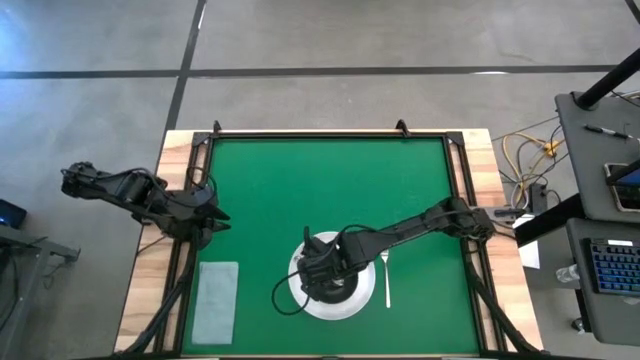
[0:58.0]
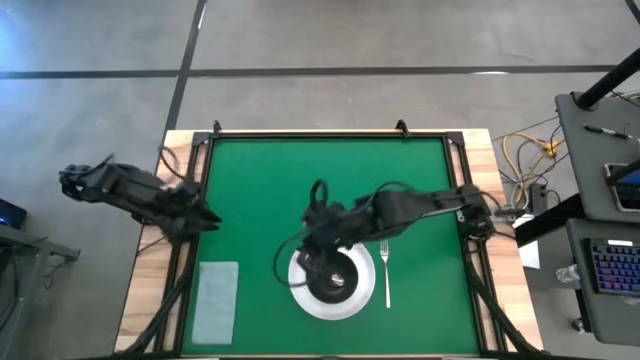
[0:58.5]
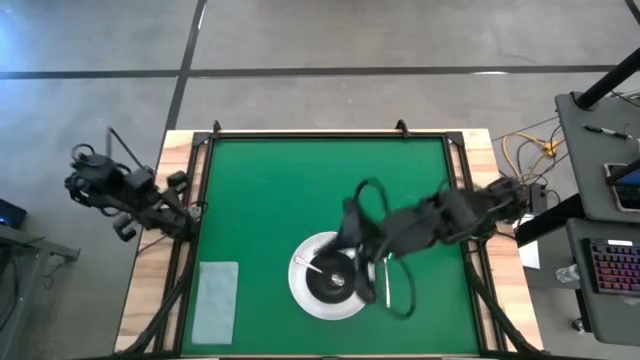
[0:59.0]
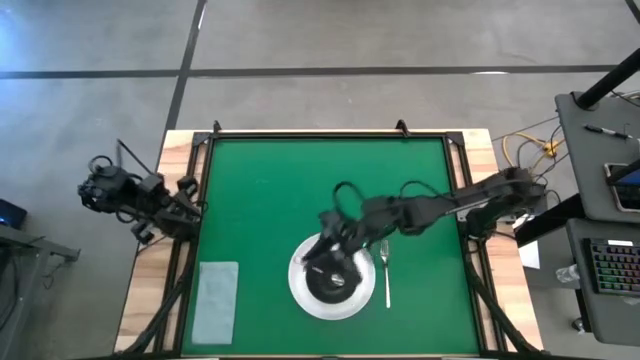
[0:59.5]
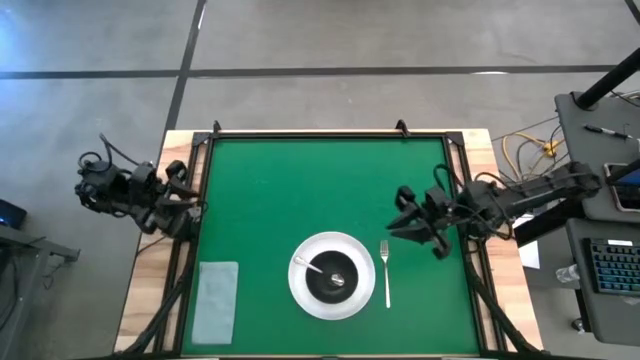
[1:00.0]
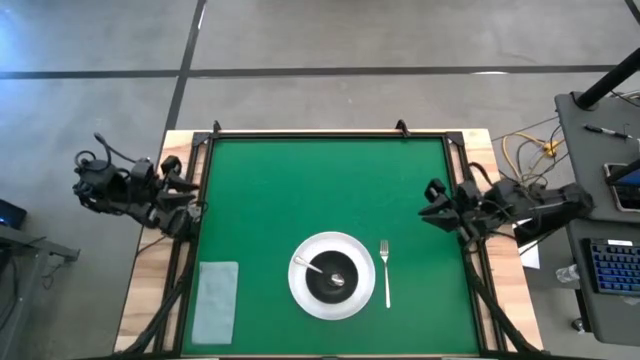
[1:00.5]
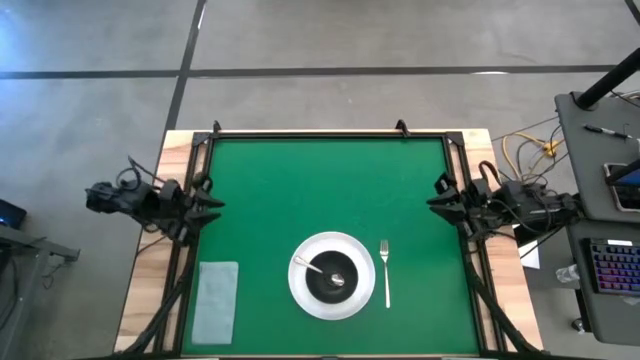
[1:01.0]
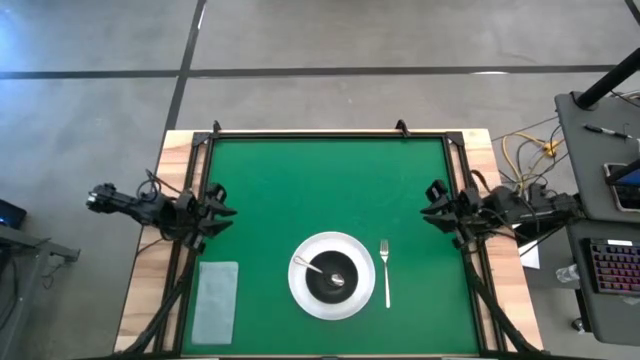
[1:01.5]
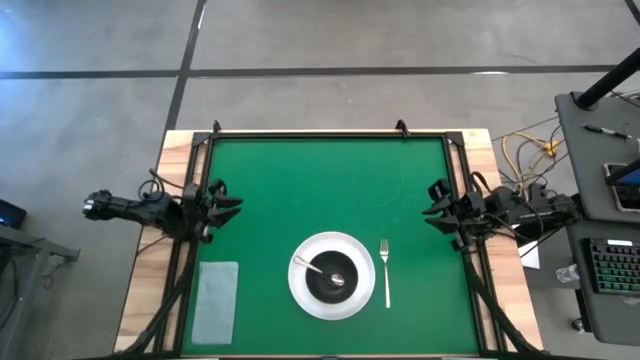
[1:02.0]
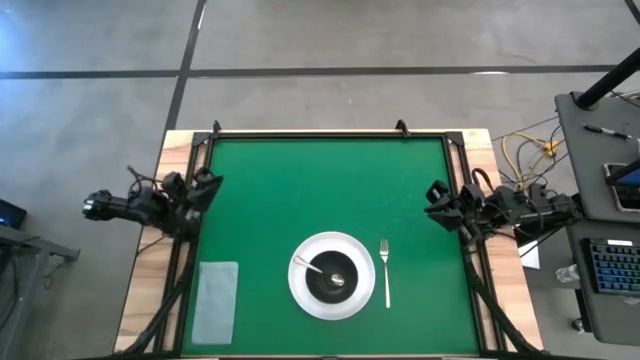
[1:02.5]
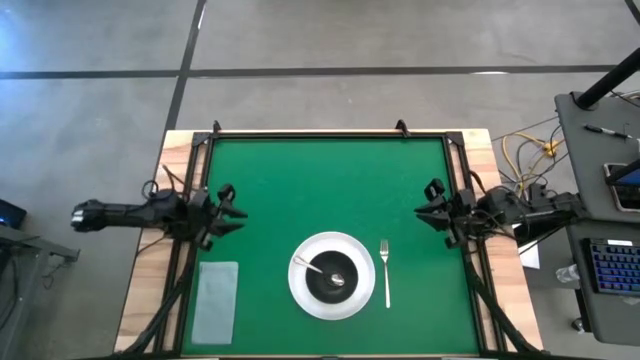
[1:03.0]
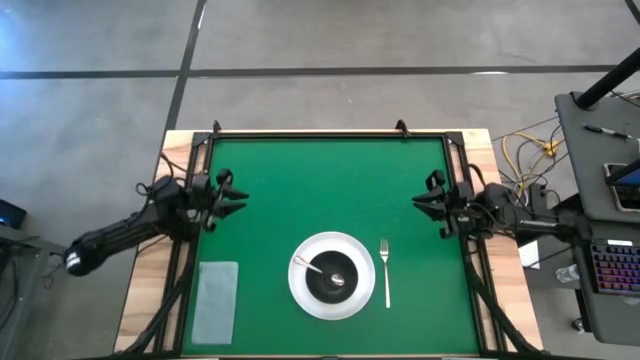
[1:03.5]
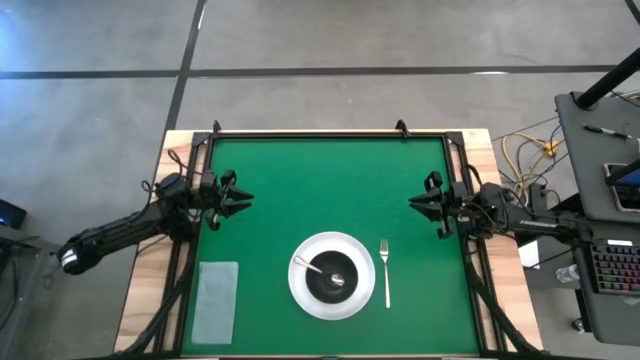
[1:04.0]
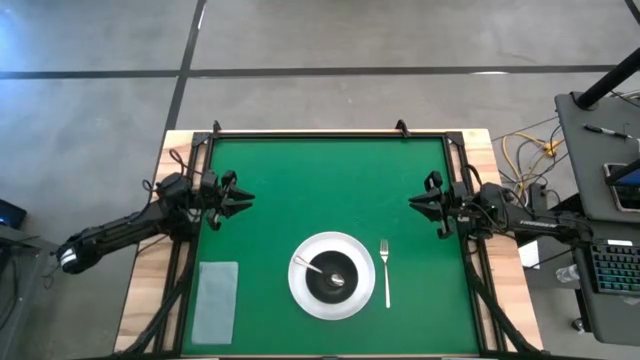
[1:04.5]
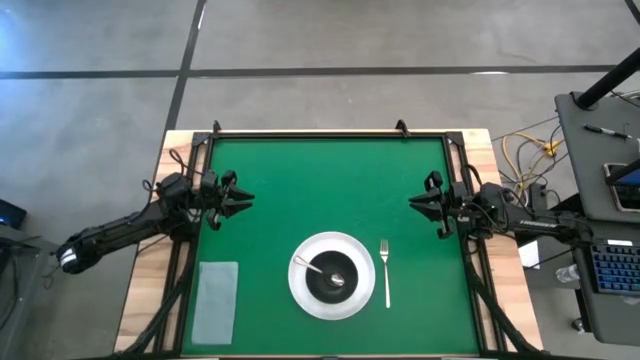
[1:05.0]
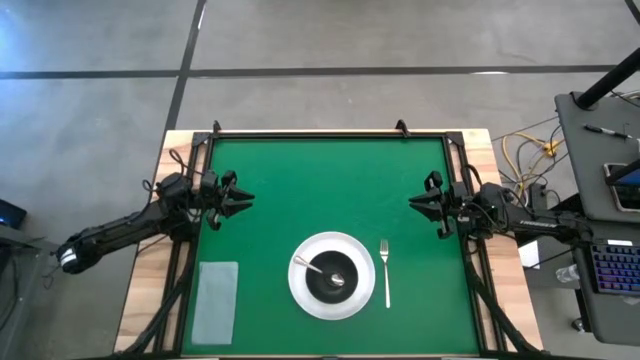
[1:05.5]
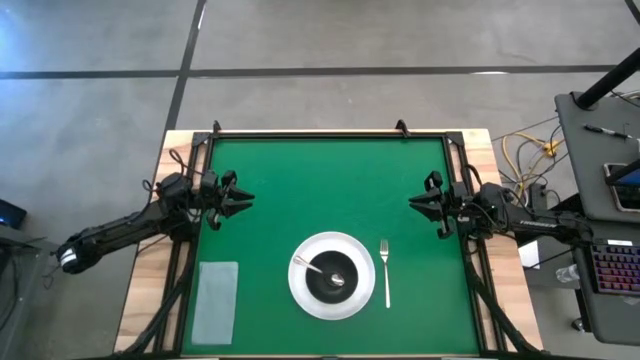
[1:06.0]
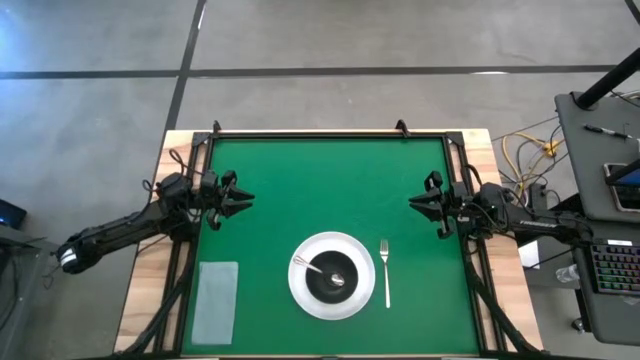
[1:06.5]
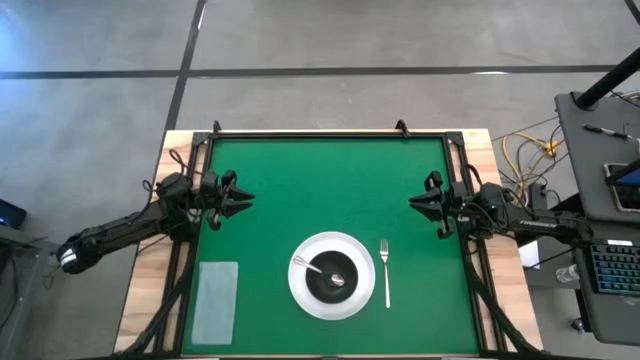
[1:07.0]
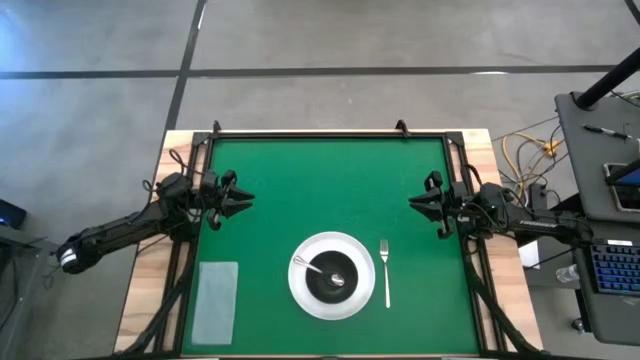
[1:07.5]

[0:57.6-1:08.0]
Task: Set table place
Return to Home Position

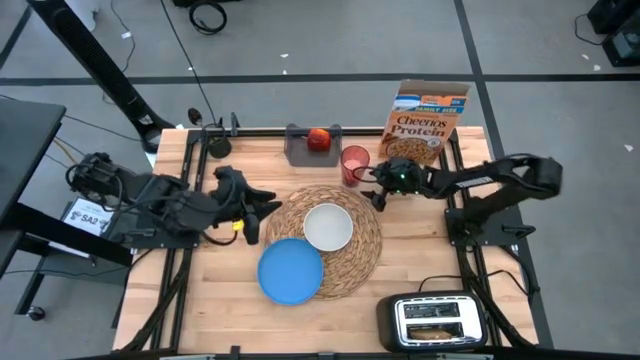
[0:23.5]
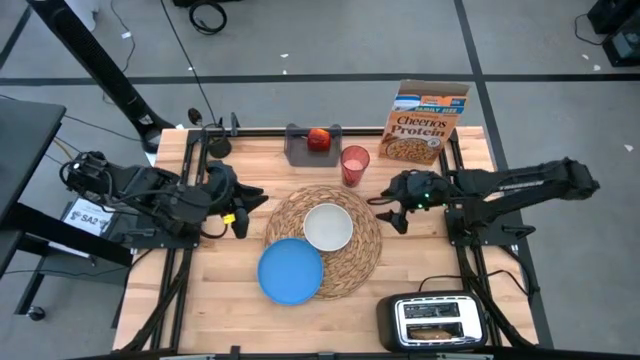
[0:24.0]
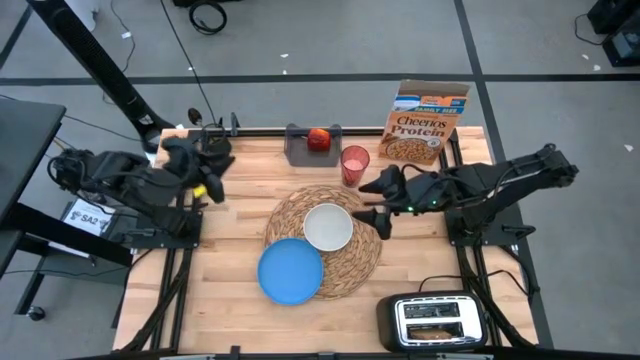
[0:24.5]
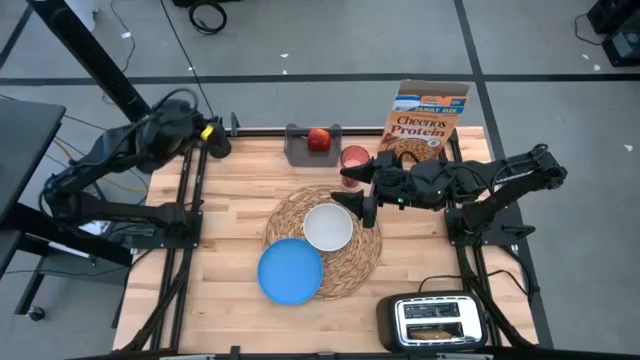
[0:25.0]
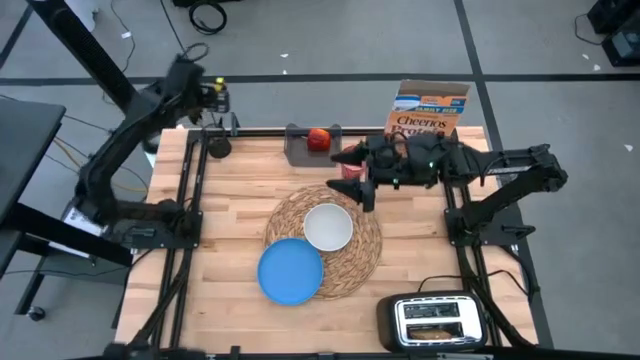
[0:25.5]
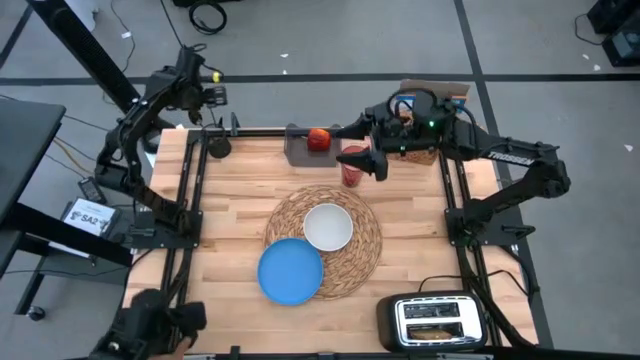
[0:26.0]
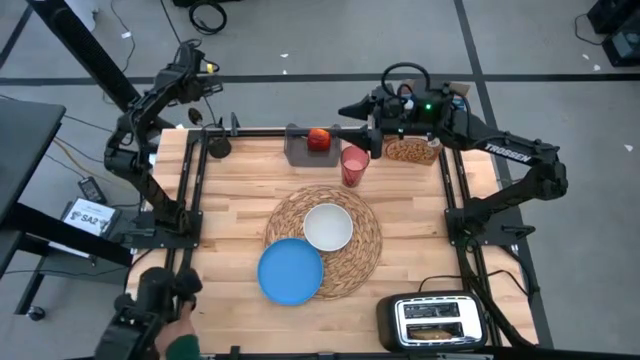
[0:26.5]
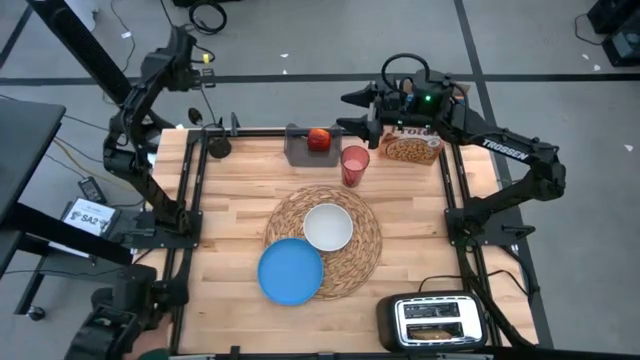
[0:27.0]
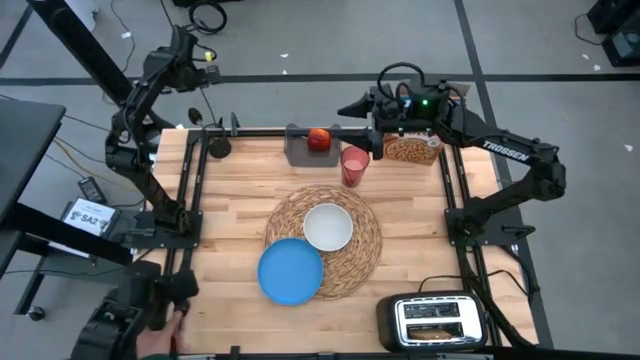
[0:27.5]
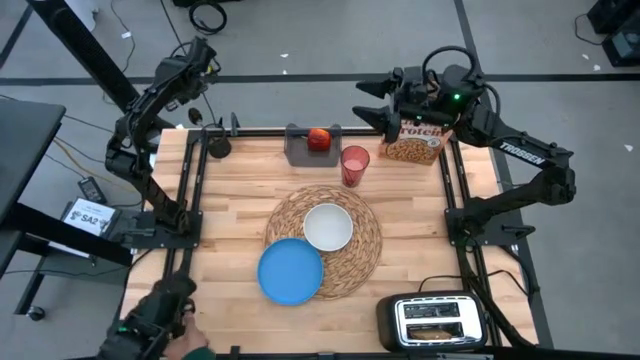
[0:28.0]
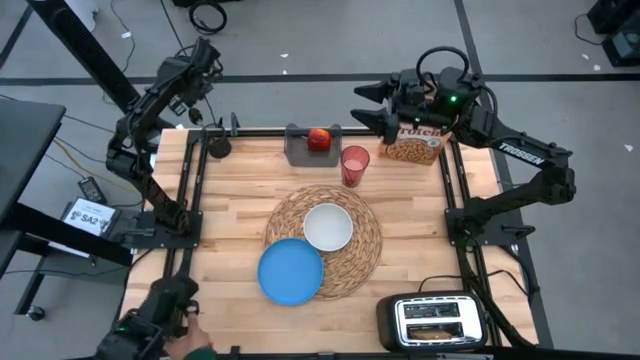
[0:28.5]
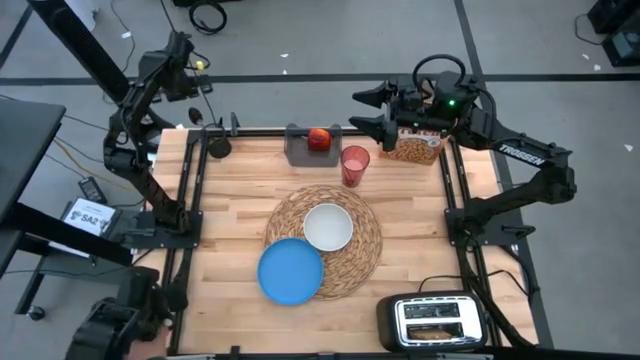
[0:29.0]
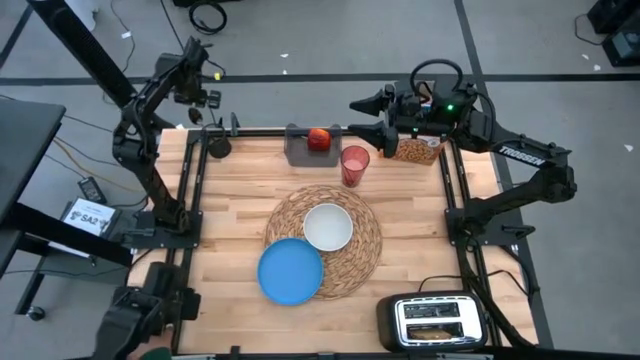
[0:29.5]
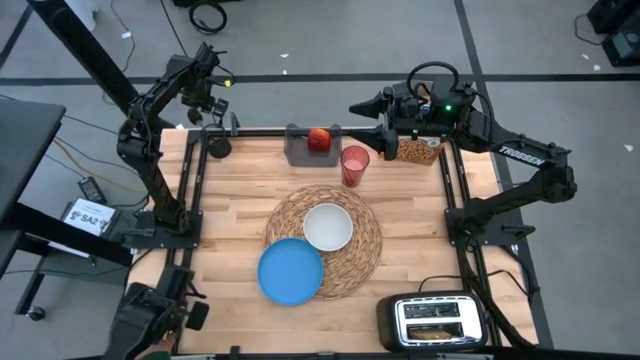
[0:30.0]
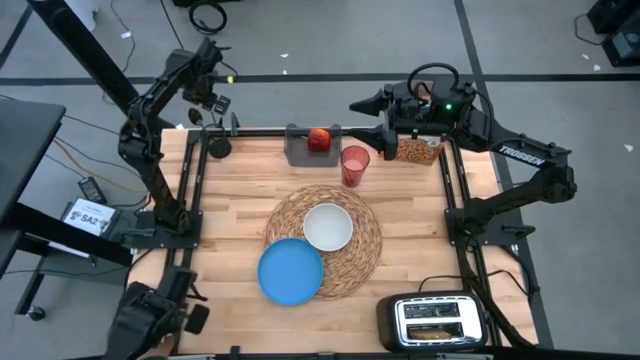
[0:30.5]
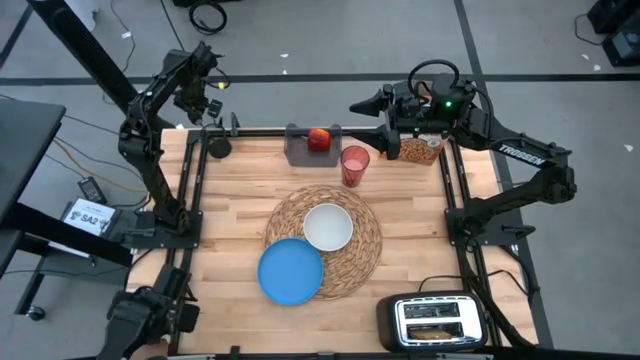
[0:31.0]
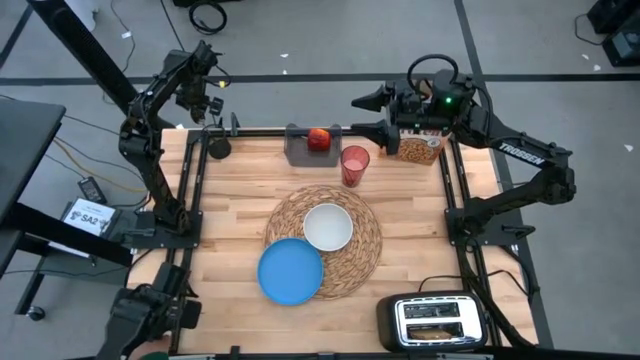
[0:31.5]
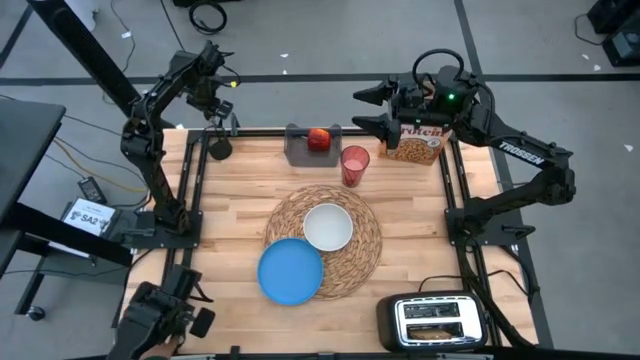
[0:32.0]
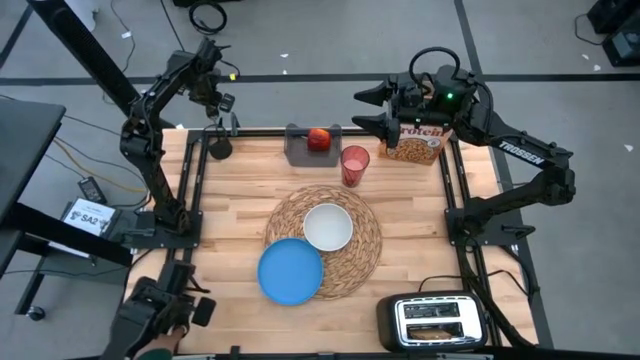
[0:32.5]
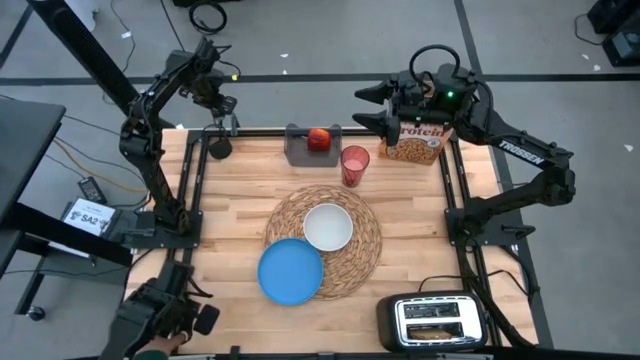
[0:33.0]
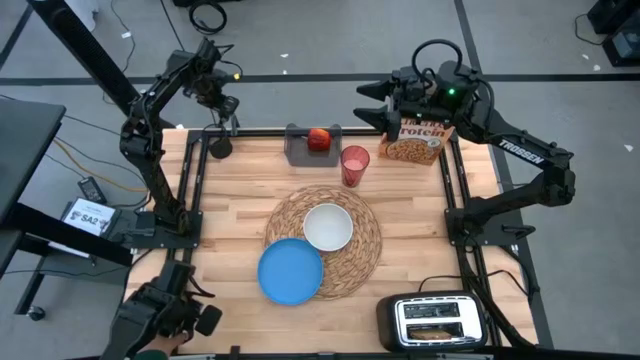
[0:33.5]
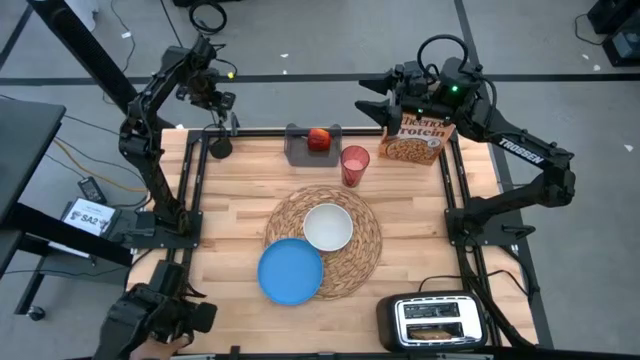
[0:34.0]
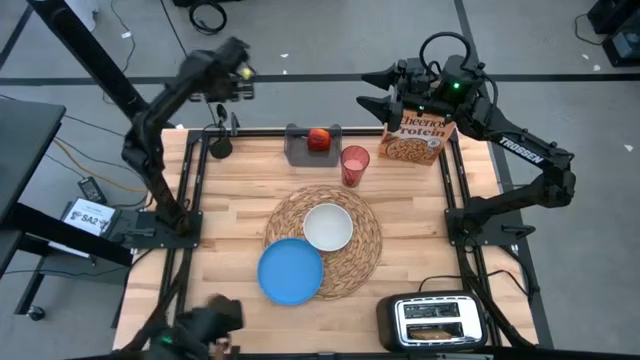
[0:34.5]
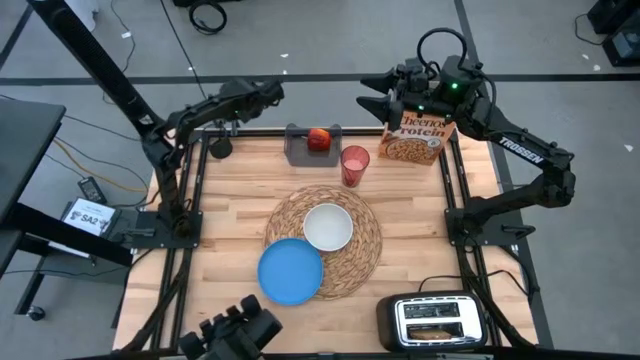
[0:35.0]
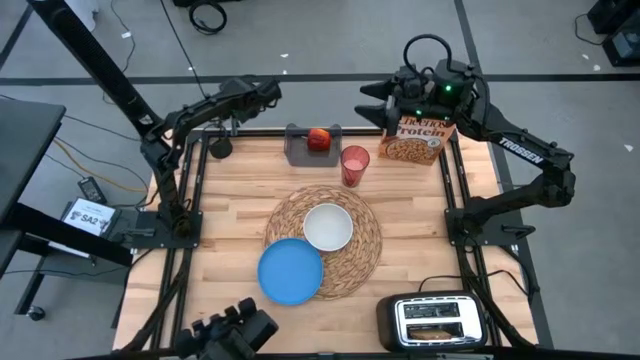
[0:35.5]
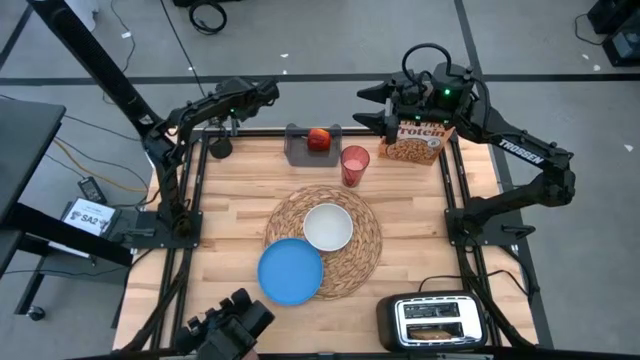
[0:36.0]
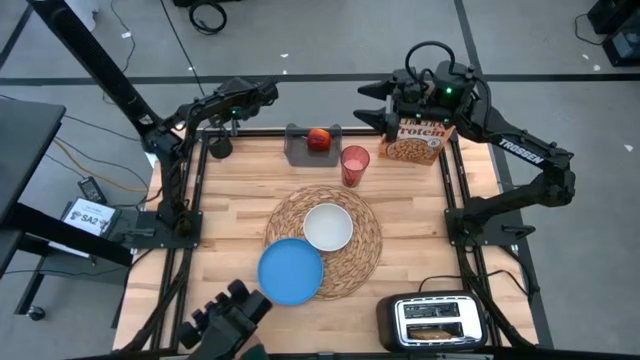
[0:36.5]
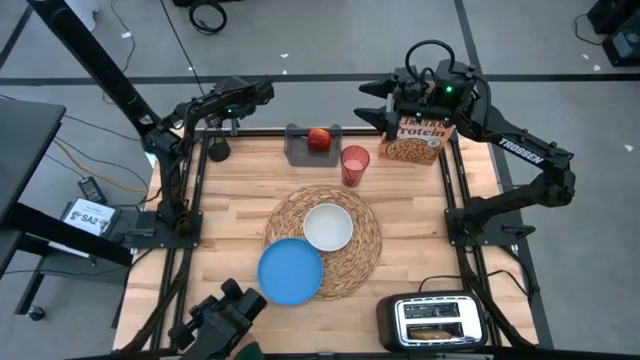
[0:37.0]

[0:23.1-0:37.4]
Task: Arrange a breakfast setting
Put the black spoon on the brown tablemat to the right of the white bowl
